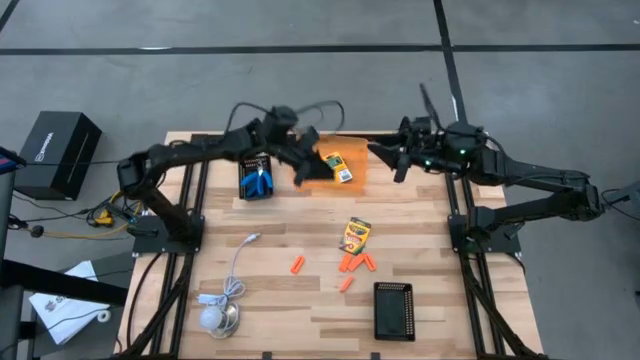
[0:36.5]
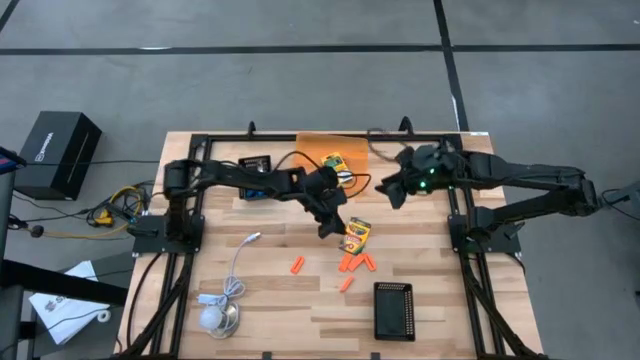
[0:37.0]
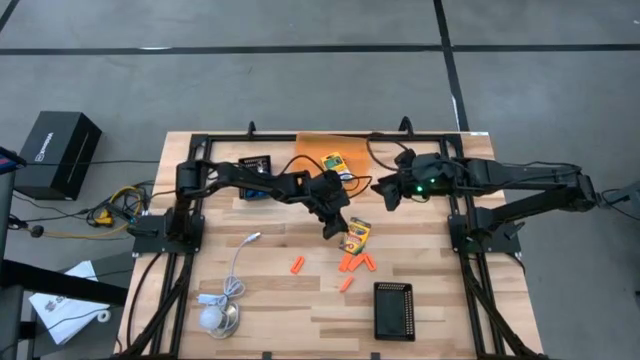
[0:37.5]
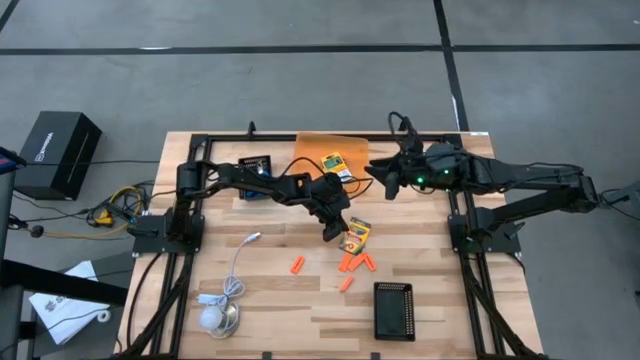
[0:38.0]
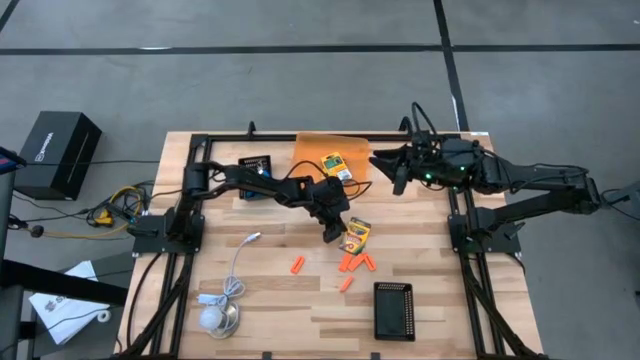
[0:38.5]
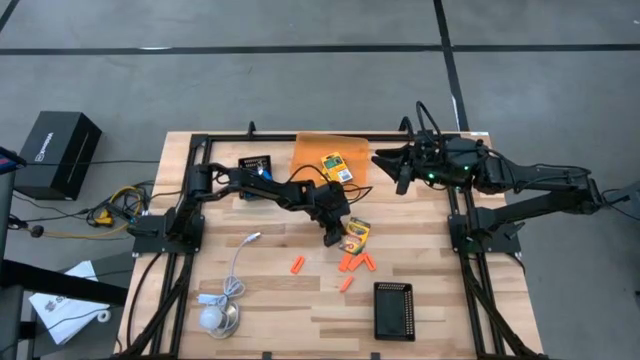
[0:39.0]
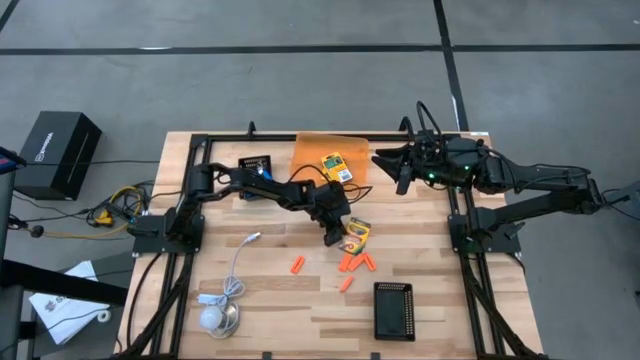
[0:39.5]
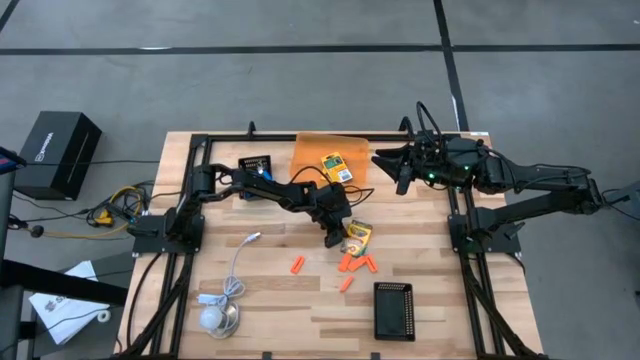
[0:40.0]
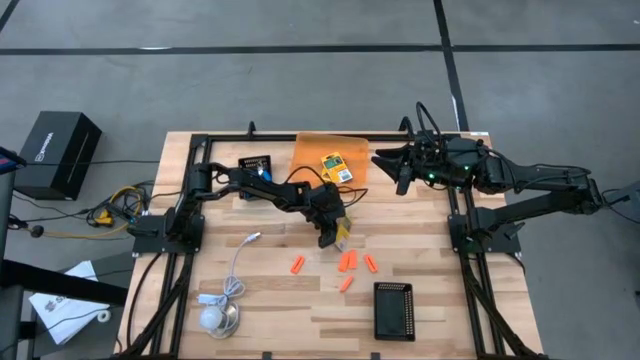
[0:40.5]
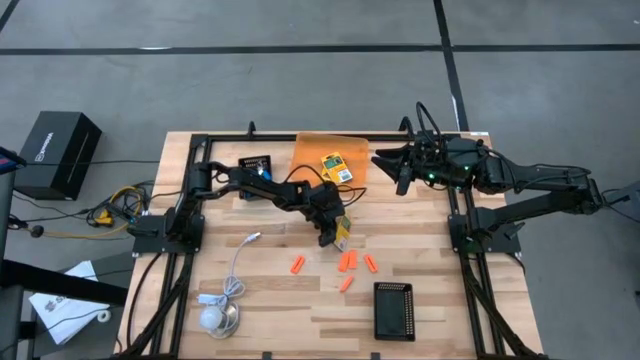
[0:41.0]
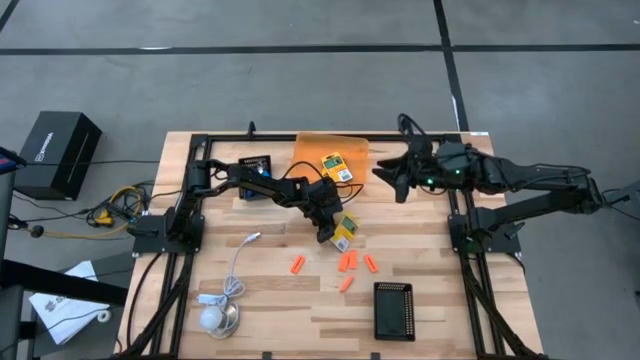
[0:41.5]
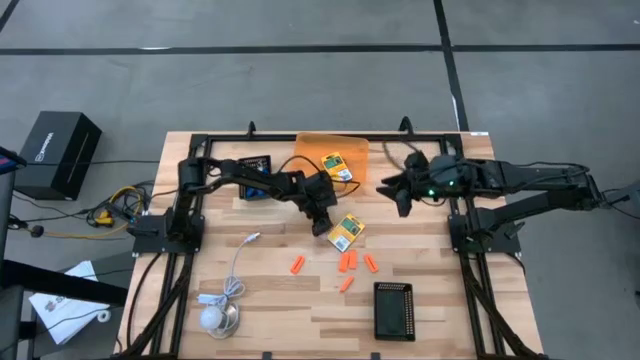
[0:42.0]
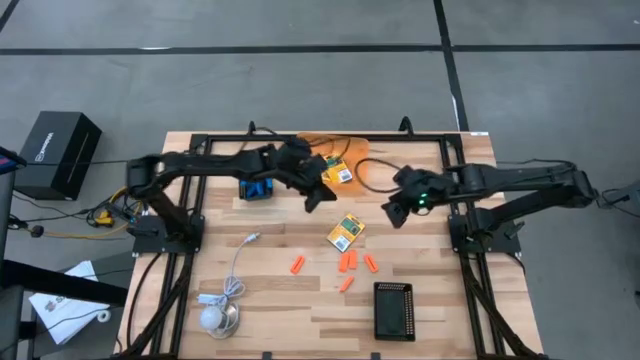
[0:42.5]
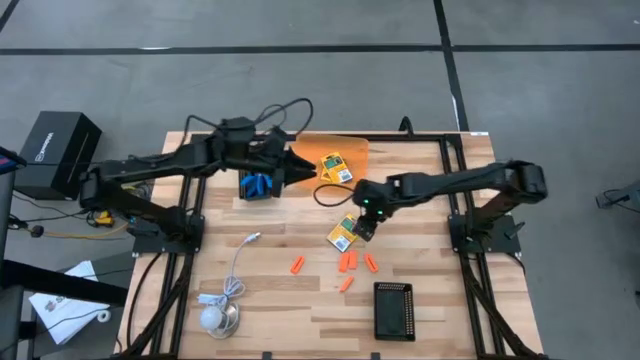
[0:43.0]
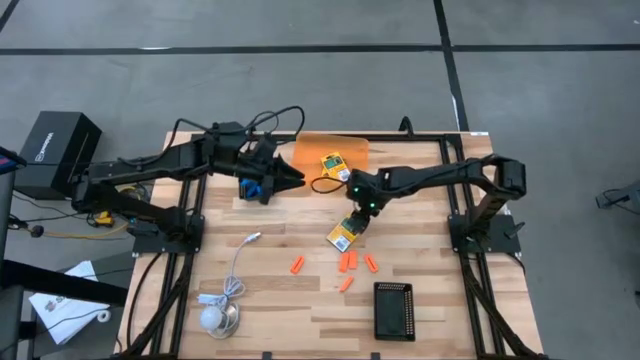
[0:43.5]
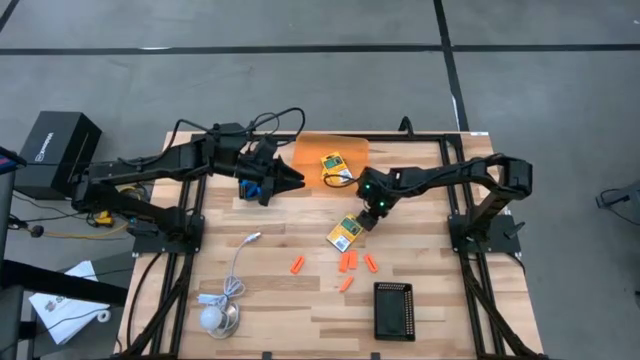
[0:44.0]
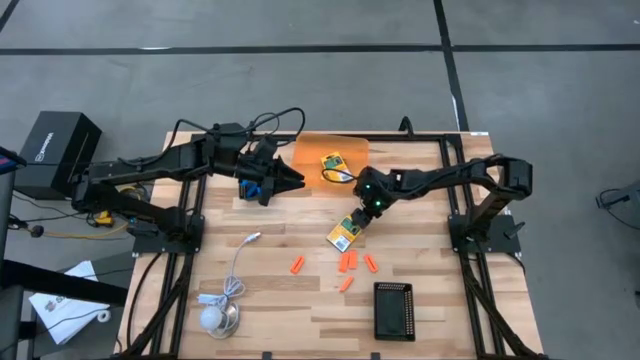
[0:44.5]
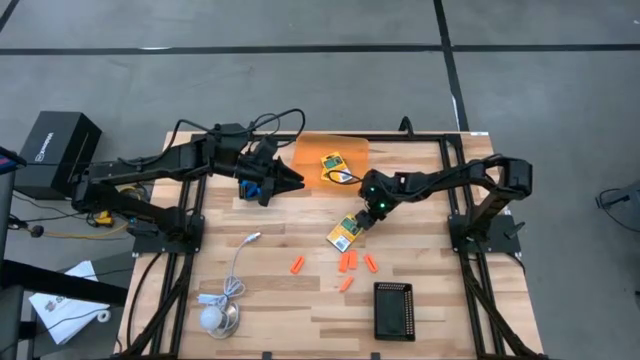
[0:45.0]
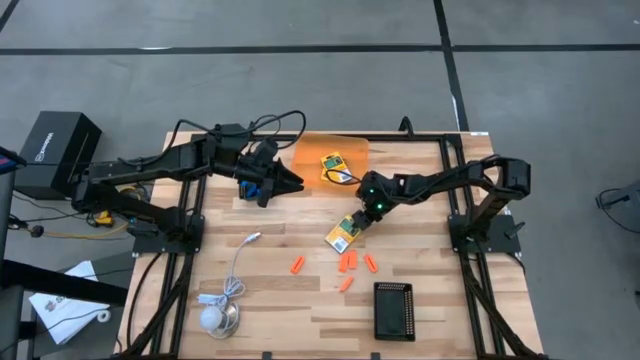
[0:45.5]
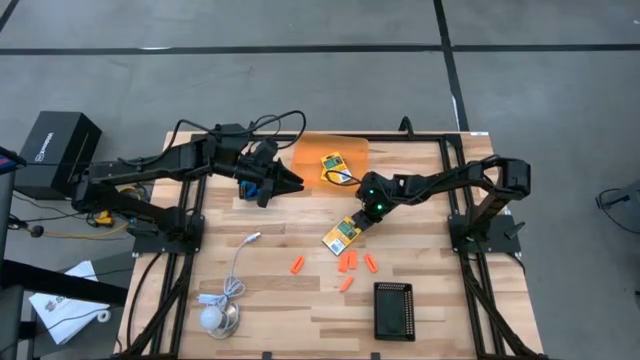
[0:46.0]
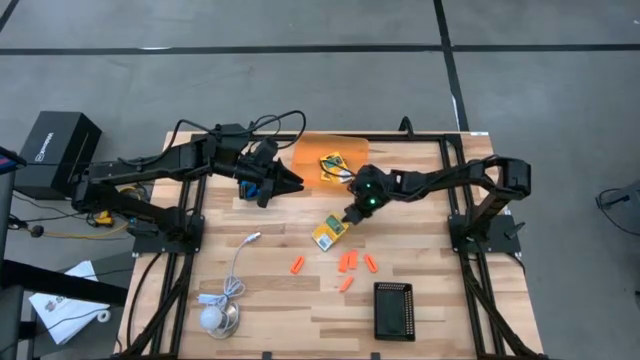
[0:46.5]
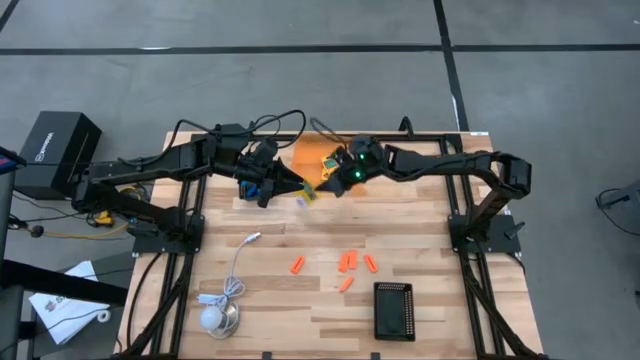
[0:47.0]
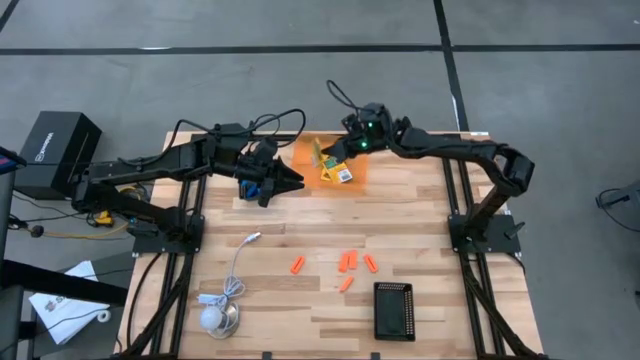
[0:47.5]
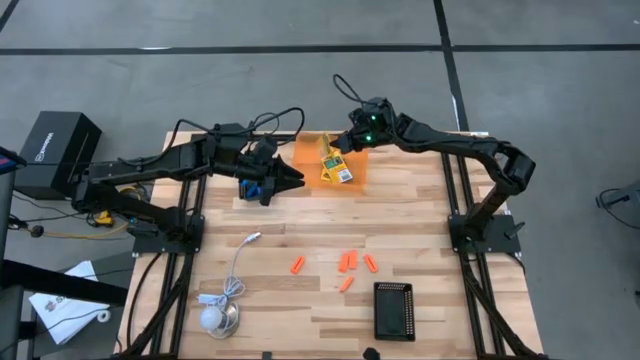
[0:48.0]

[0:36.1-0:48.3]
Task: Pick & Place School Supplies
Put the crayon box into the orange bin

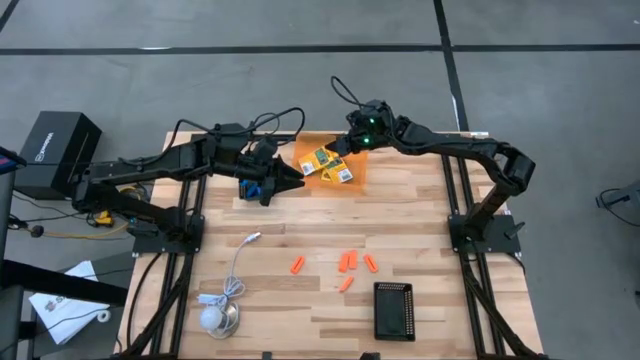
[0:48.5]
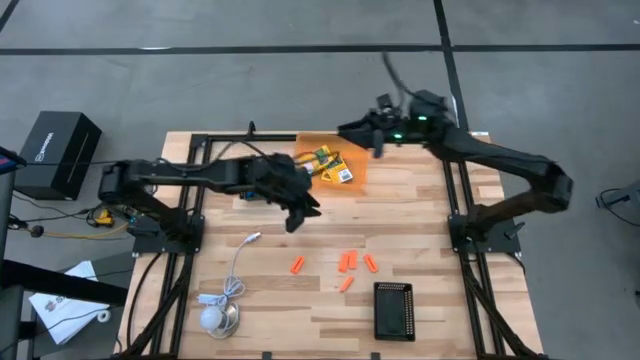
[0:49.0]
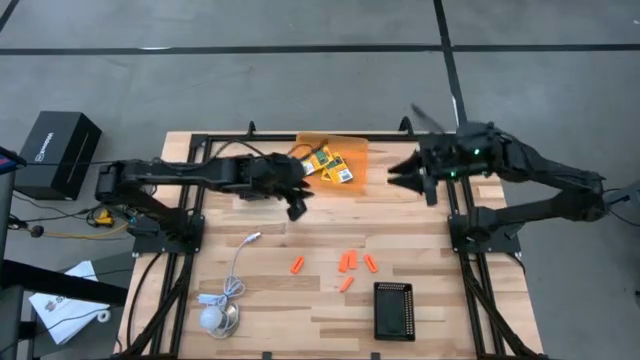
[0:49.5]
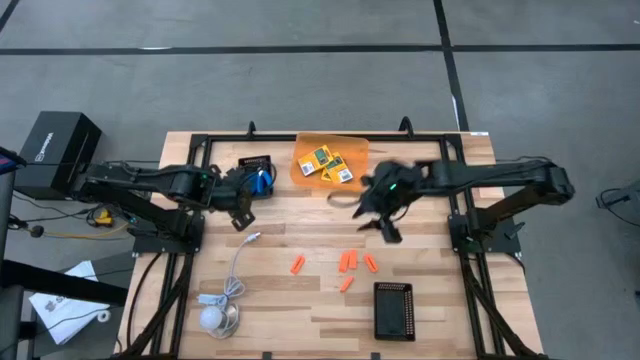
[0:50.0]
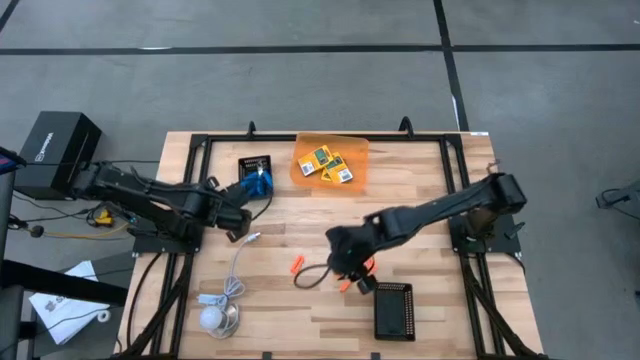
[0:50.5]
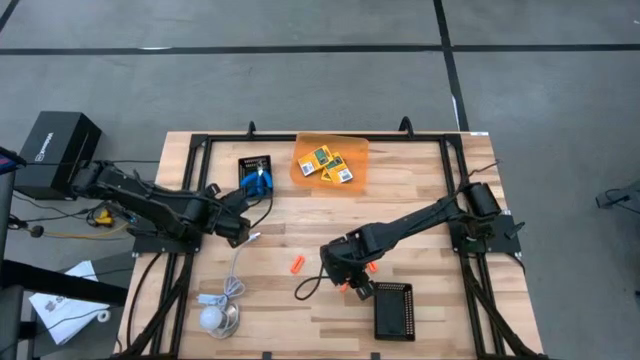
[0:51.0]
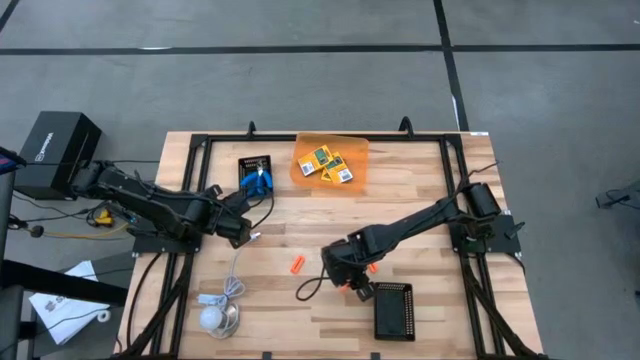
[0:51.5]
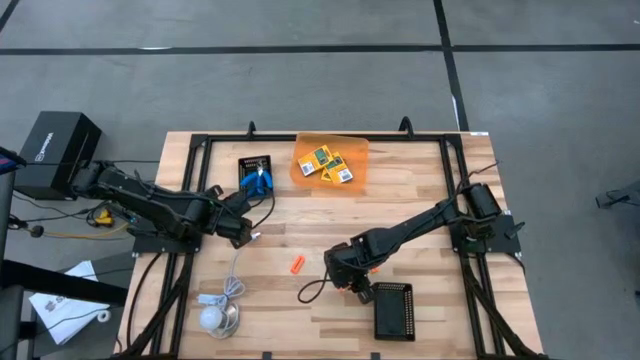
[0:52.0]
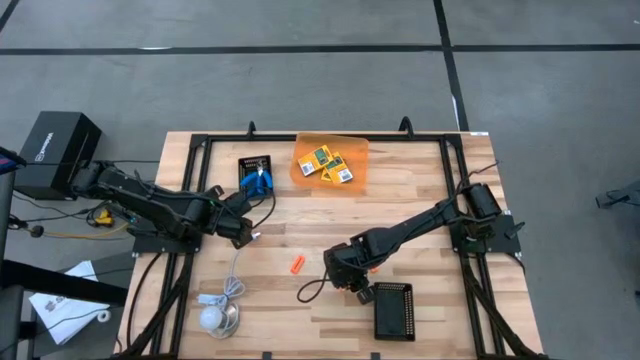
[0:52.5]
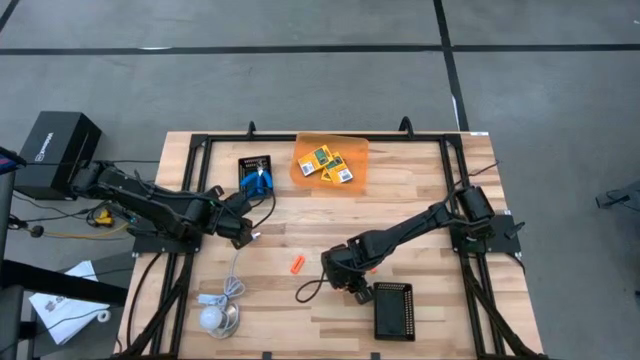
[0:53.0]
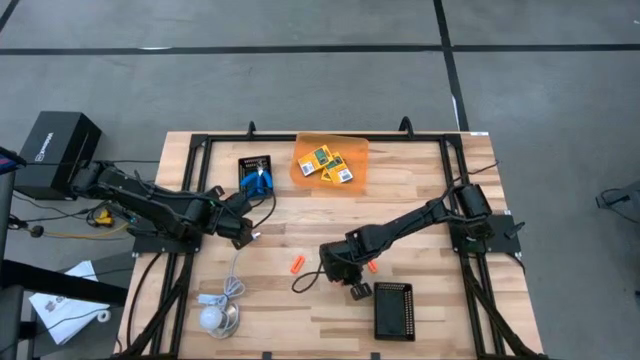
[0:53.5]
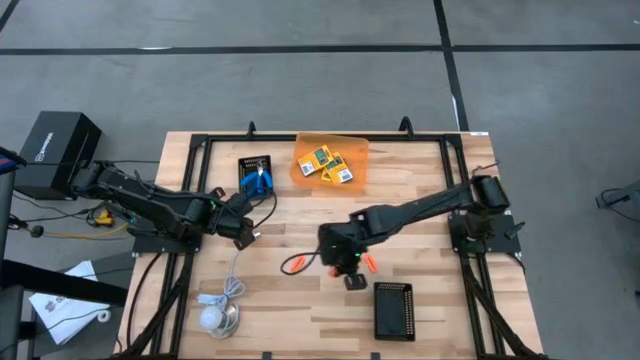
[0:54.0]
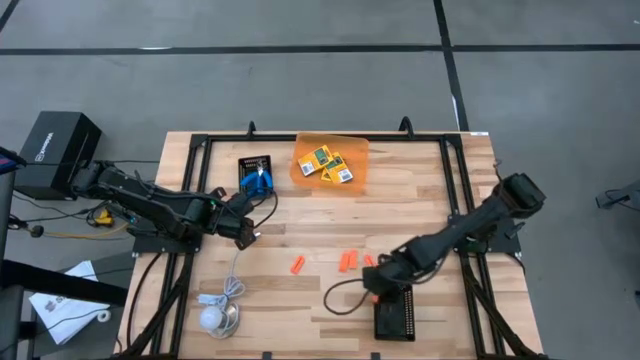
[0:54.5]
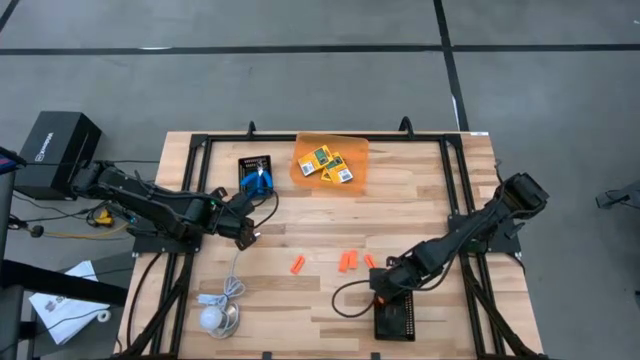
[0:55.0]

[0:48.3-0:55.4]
Put the eraser into the bottom black bin

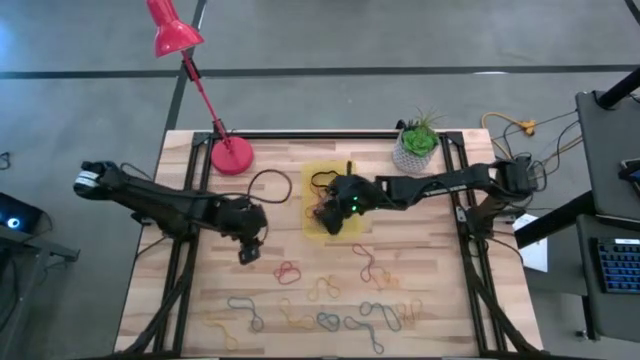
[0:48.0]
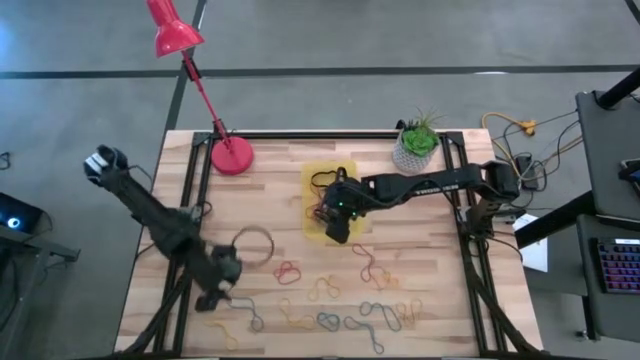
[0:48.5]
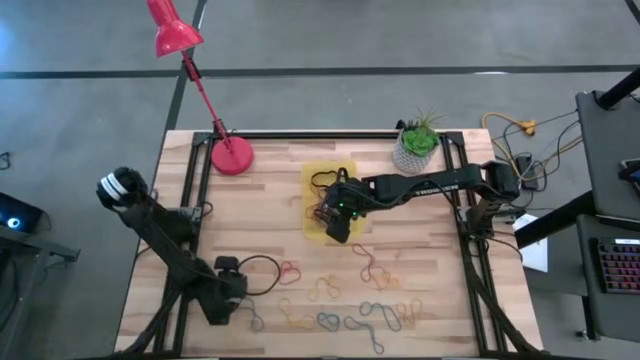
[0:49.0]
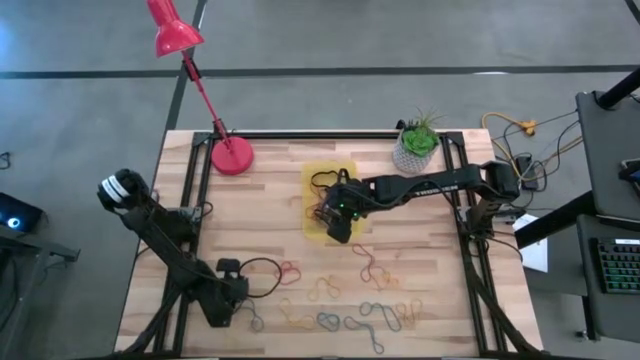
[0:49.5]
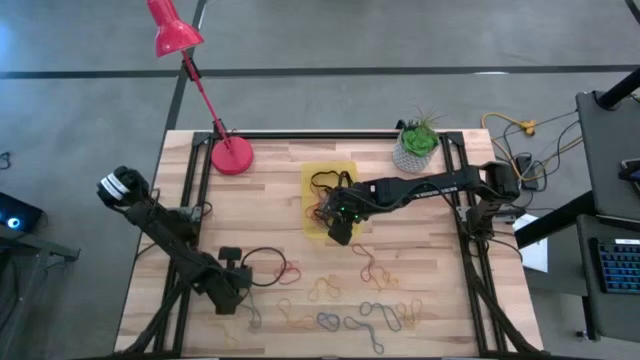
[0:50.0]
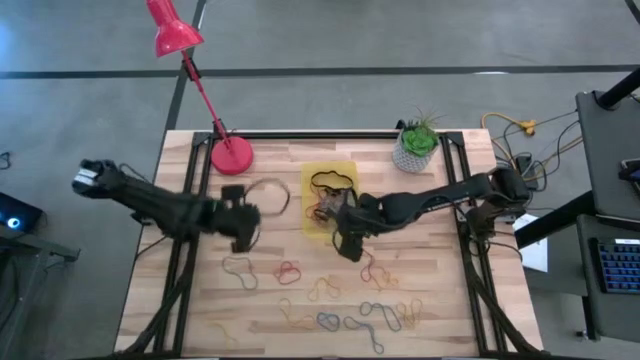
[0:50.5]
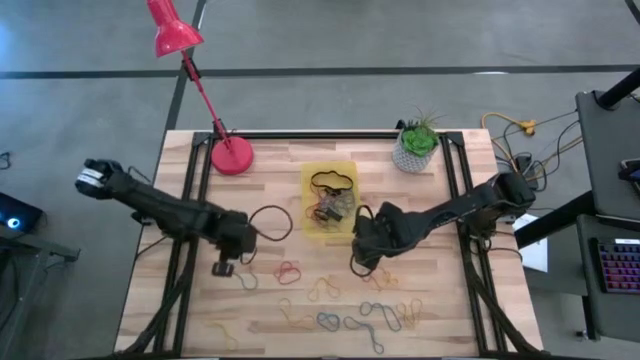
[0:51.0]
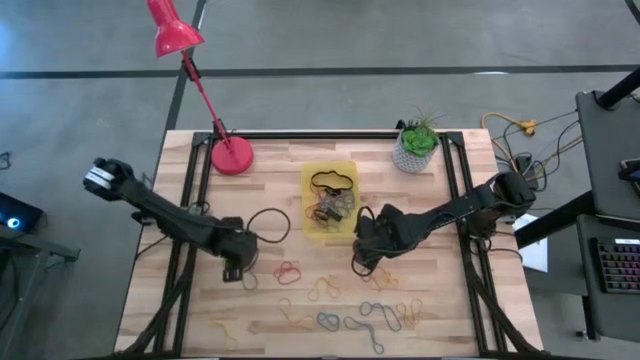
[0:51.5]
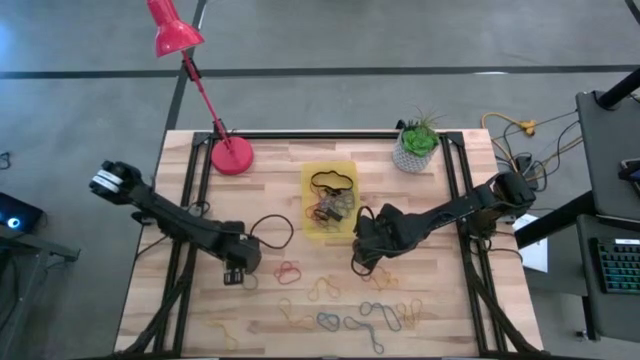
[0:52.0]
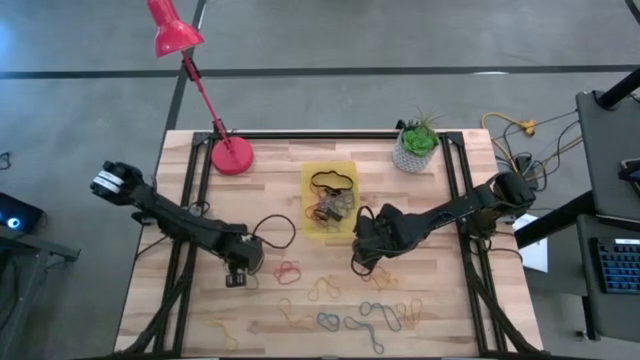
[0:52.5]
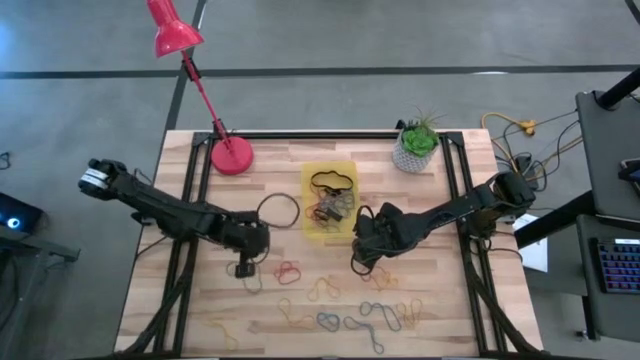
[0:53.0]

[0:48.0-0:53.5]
Task: Pick and place rubber bands into bin
Put the blue rubber band into the yellow bin
